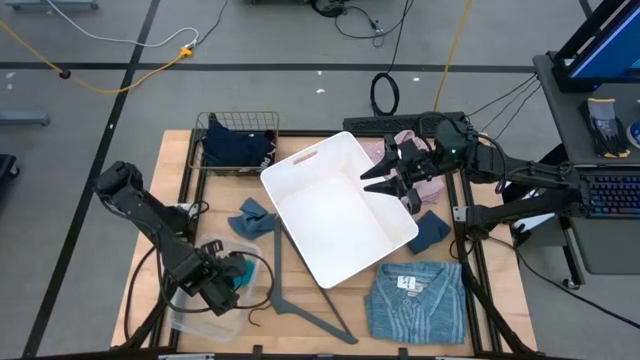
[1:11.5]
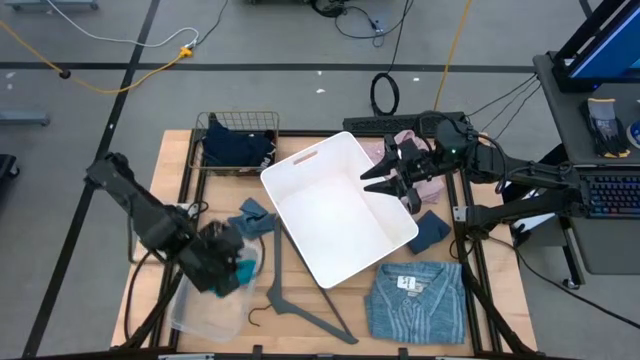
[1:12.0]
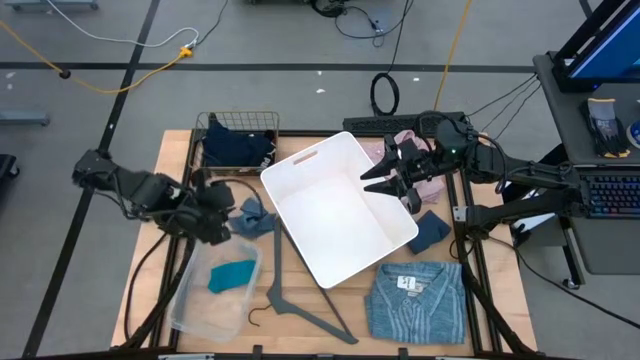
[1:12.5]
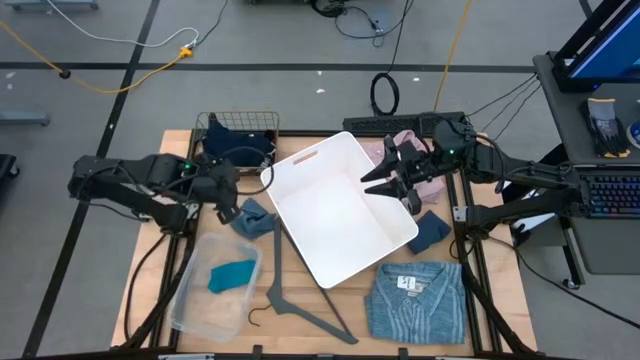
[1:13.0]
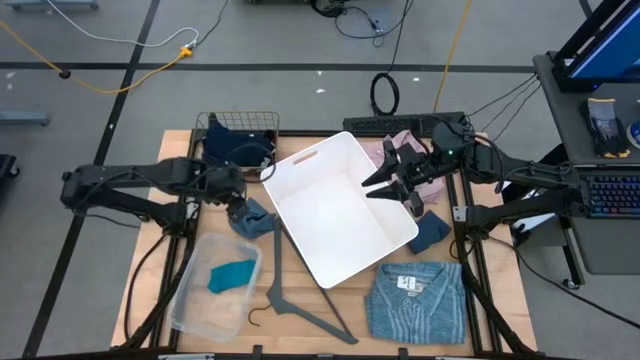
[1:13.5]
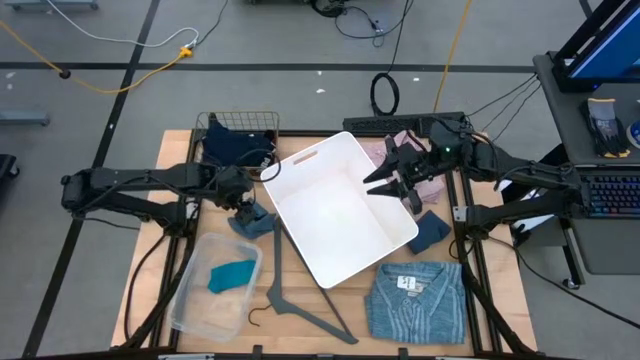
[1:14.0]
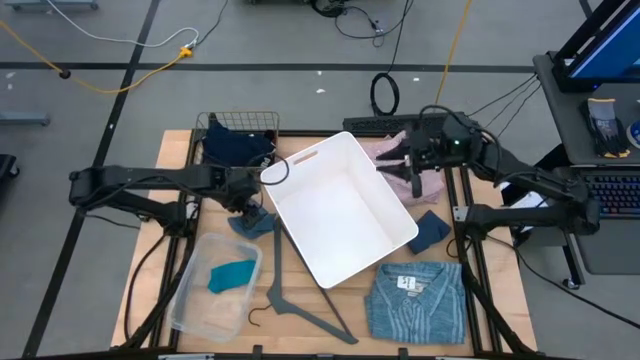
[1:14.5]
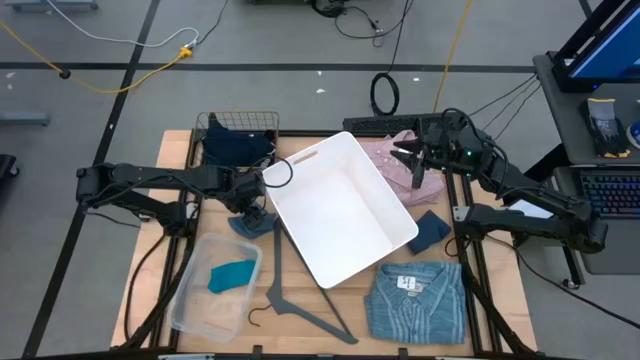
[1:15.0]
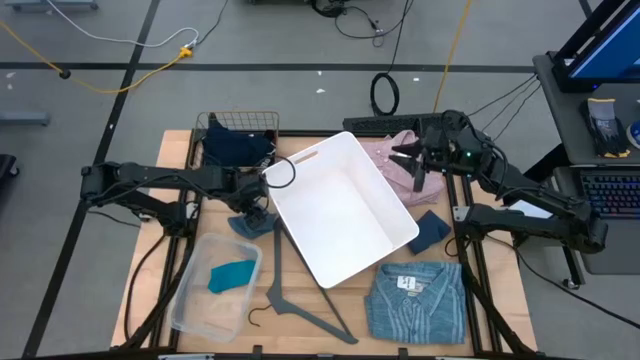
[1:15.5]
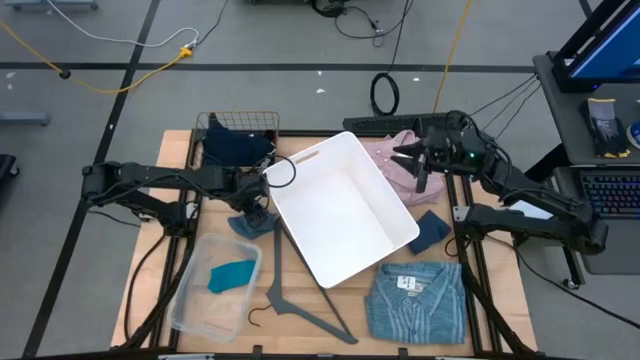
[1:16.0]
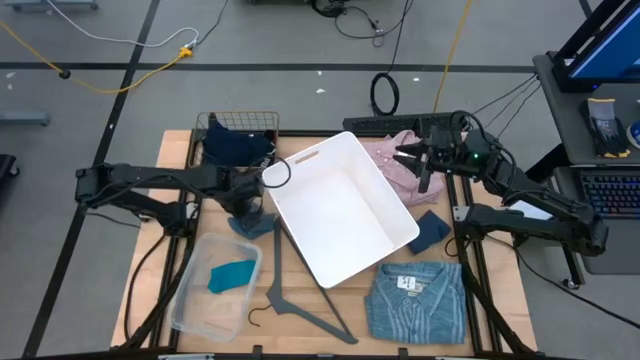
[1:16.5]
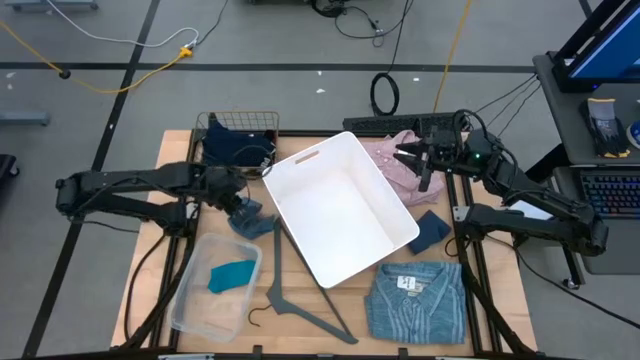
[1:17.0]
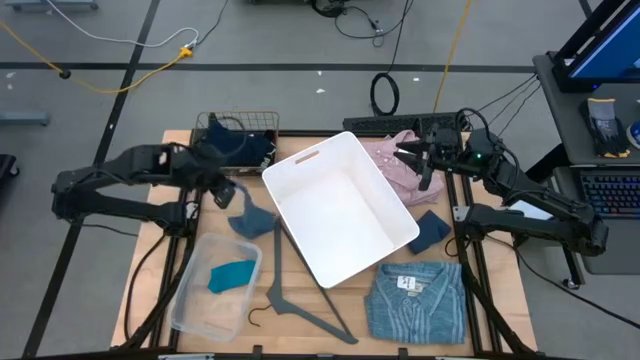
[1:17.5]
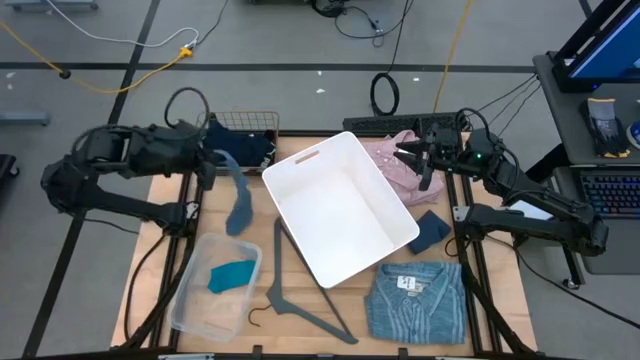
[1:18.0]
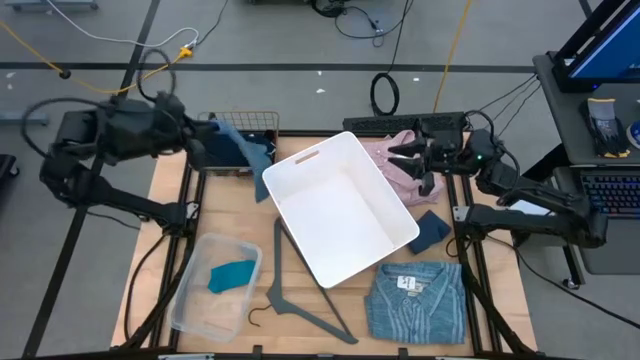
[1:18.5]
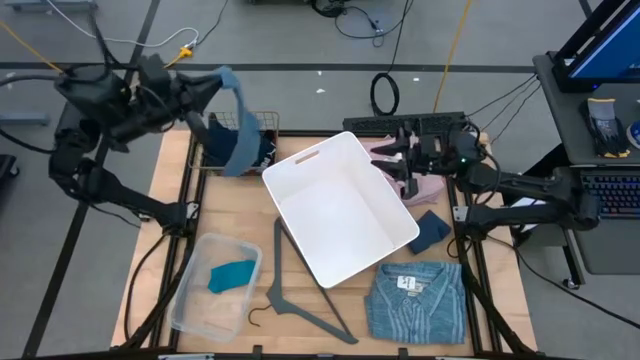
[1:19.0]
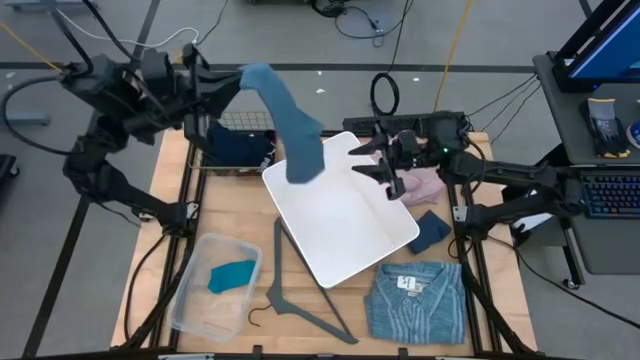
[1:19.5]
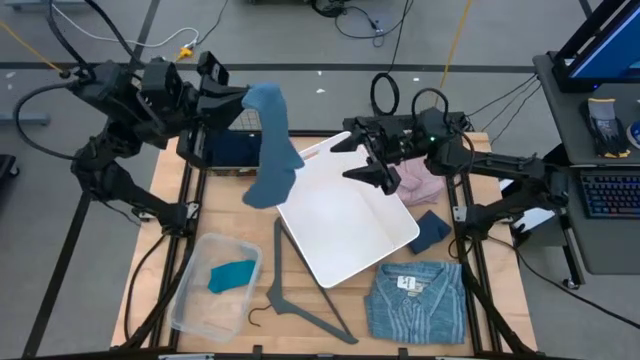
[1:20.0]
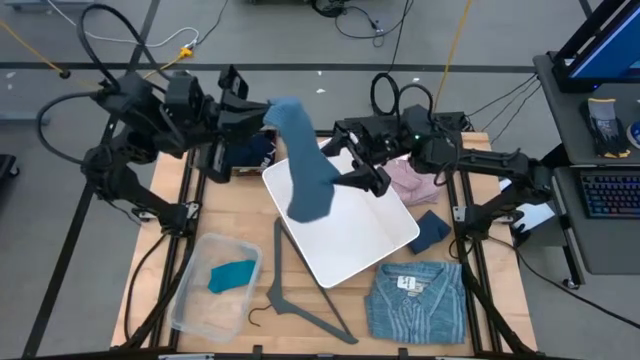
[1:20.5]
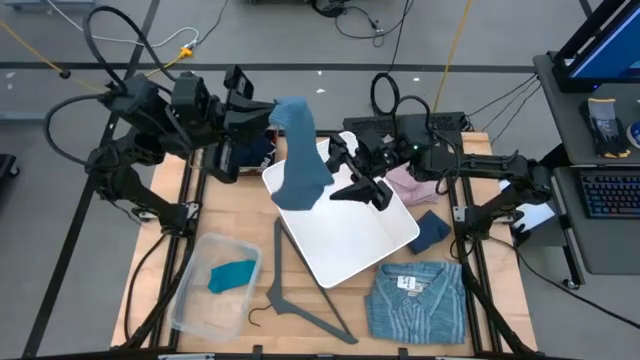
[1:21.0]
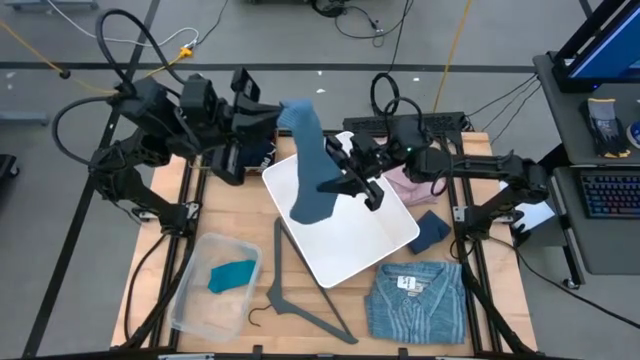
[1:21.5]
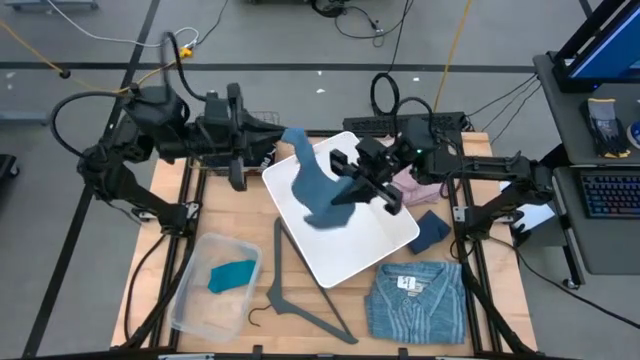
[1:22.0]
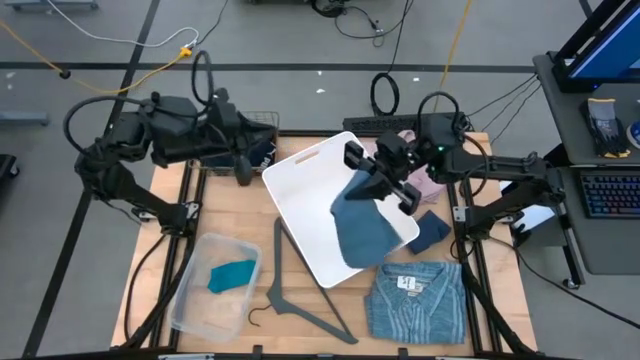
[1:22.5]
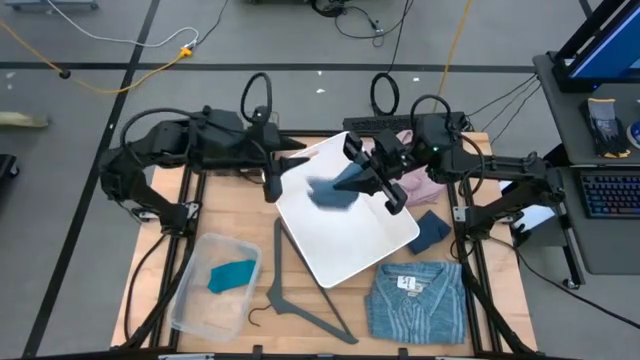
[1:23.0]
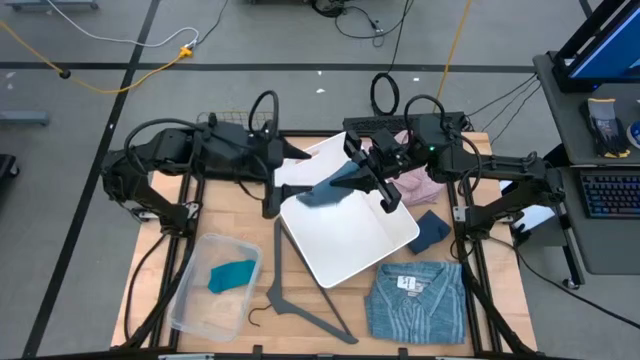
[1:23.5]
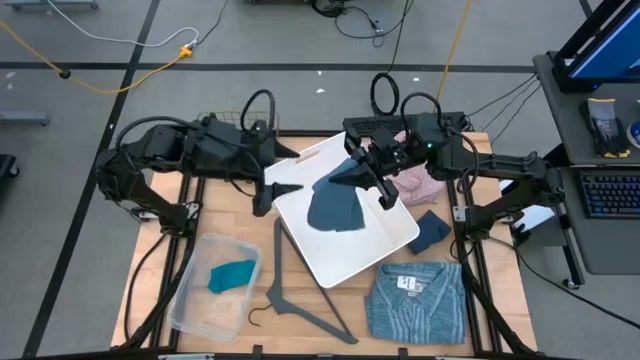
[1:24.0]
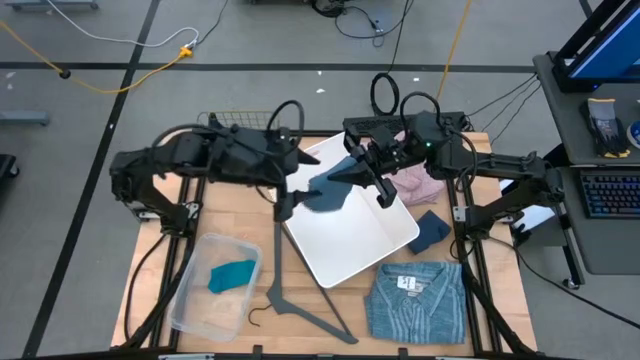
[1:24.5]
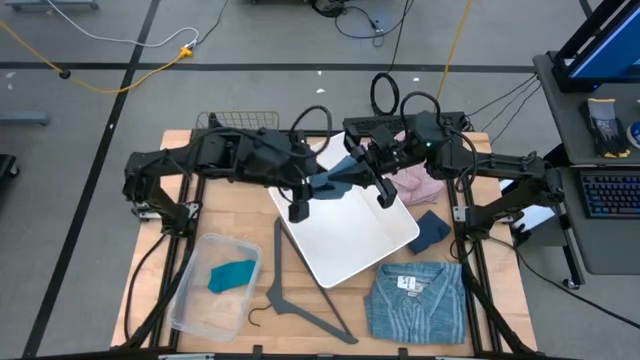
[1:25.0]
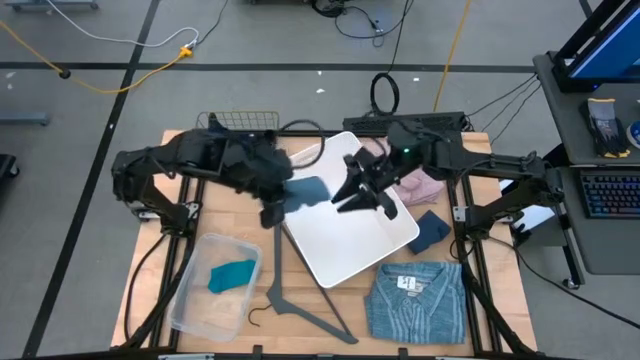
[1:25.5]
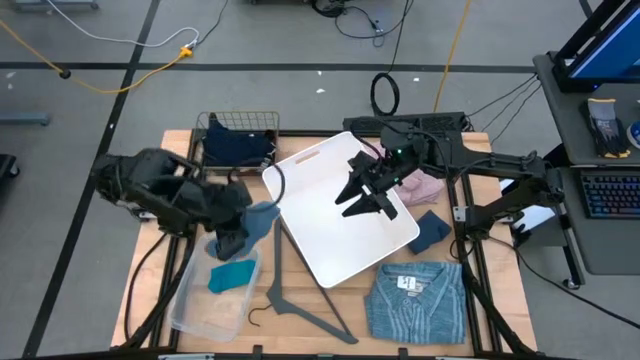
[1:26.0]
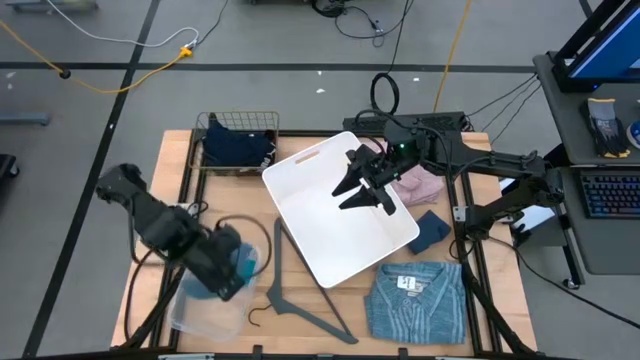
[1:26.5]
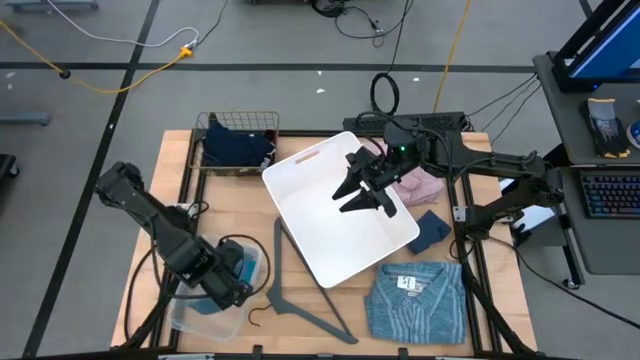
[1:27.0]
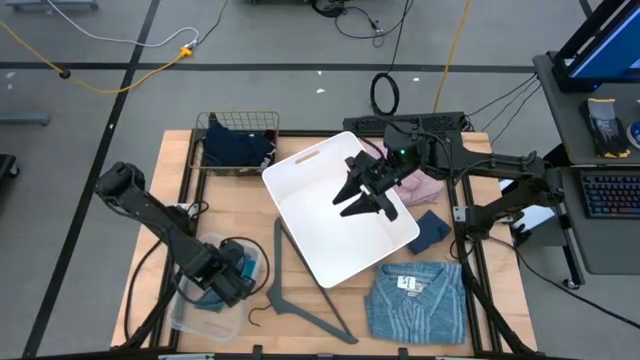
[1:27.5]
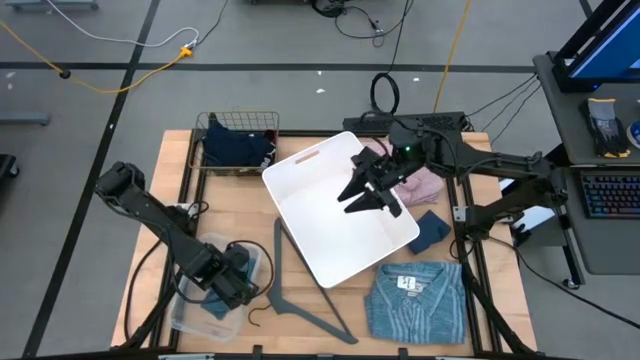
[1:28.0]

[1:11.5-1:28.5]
Task: Pick & Place Cloths
Put the left blue sock into the transparent bin

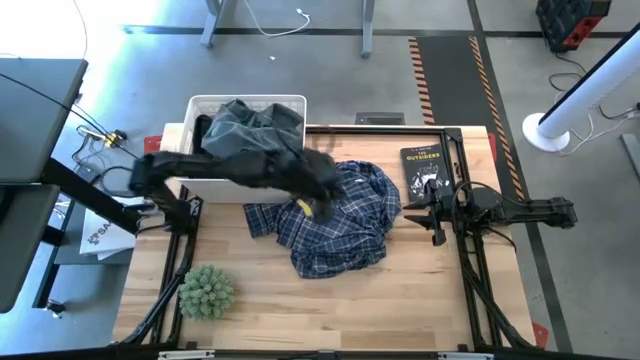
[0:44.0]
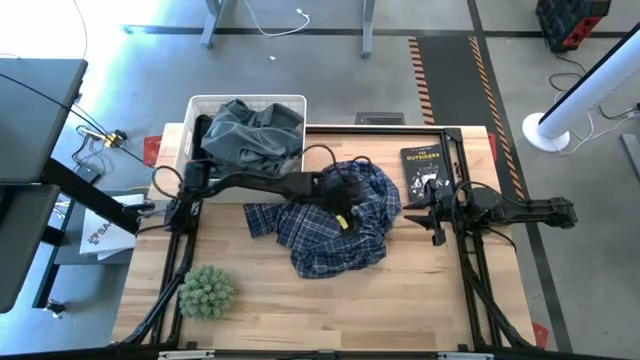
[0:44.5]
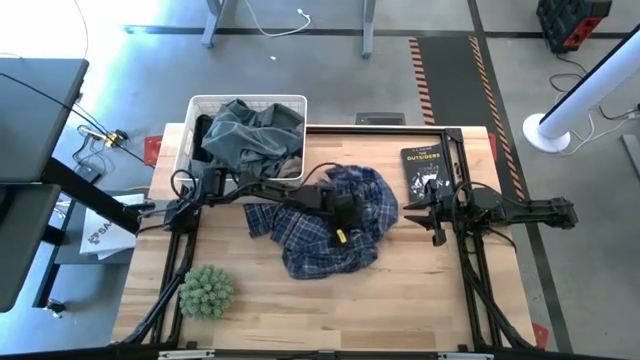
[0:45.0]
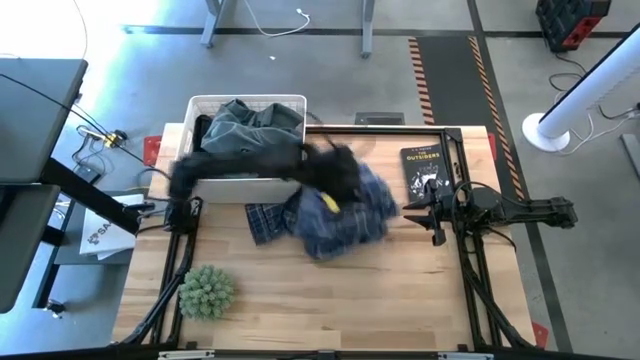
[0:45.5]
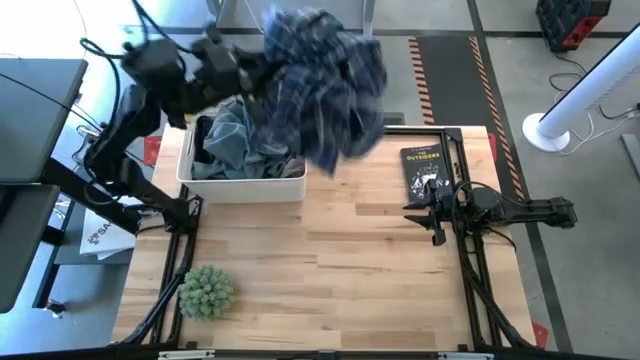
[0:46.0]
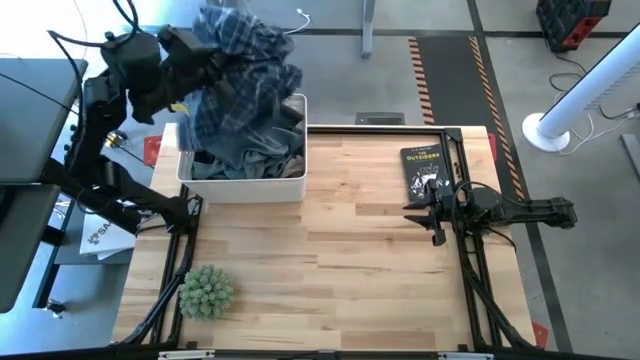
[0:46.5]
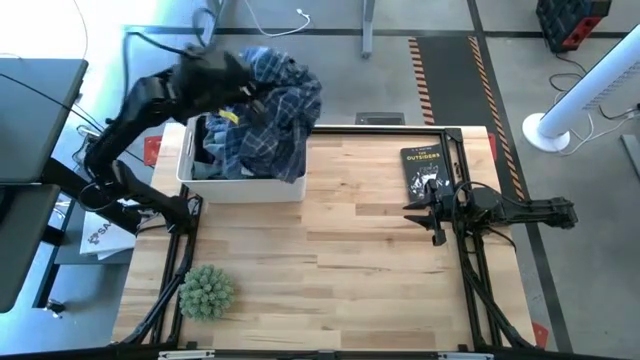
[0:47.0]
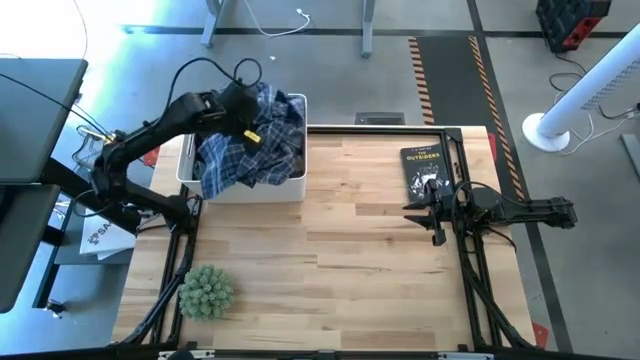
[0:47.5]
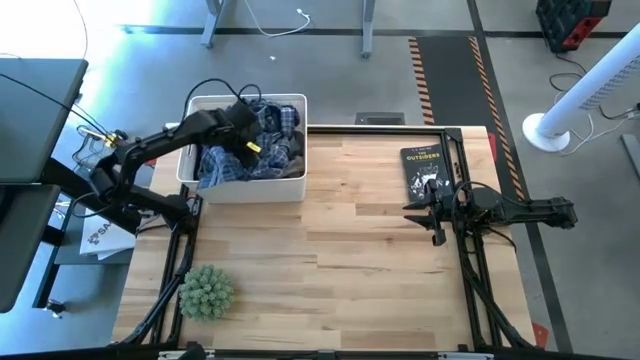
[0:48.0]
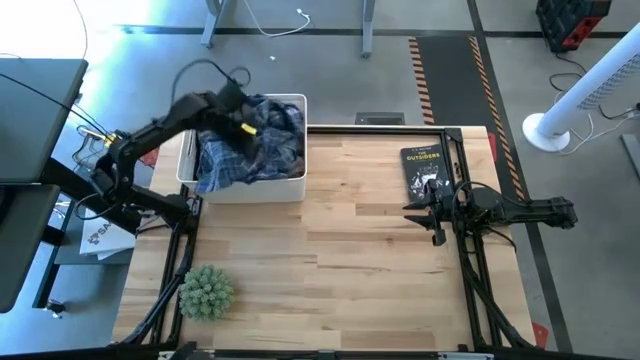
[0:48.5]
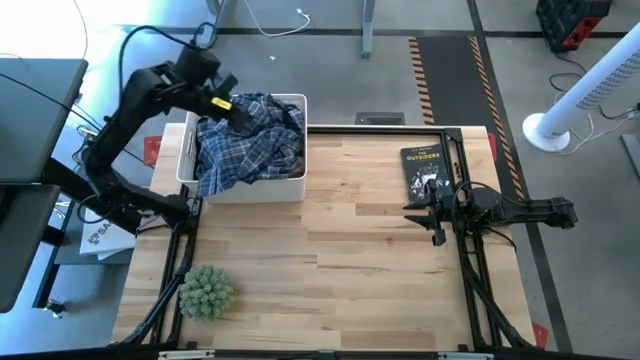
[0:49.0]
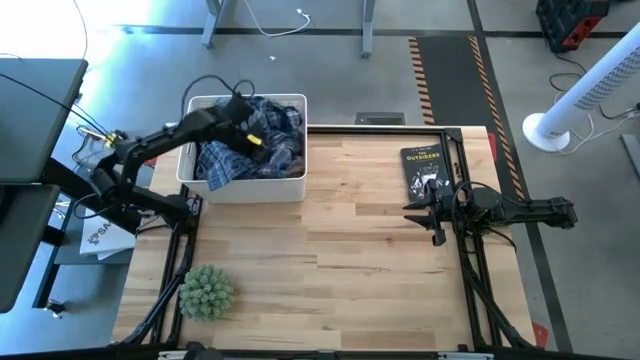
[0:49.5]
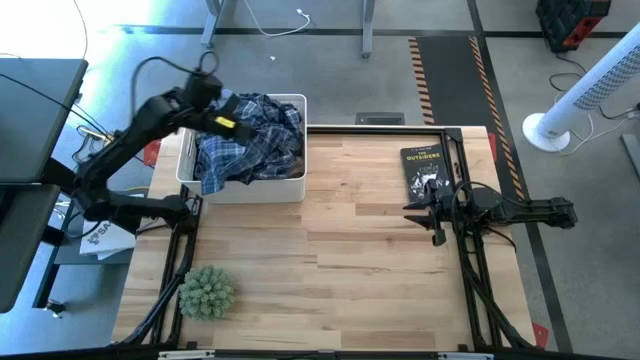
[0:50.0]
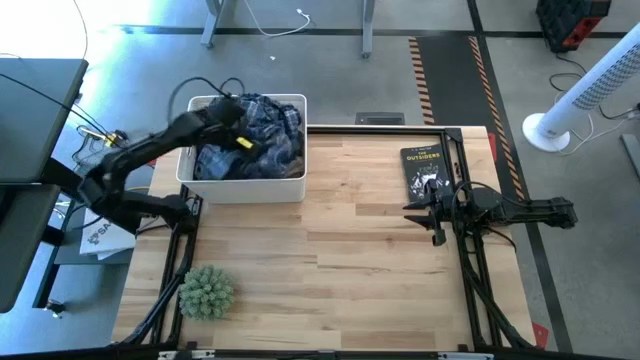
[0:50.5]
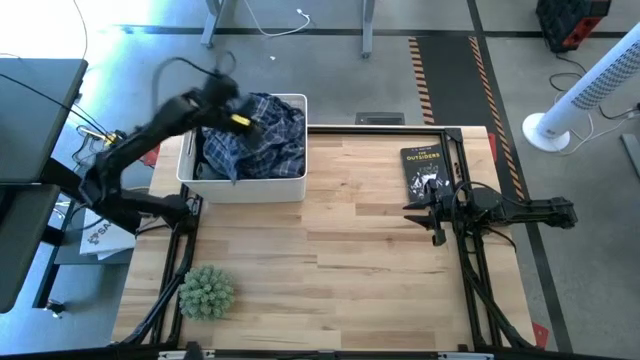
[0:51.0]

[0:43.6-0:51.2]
Task: Sort clothes
Put the blue long sleeve polo into the white laundry bin
